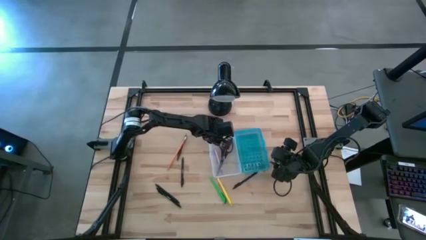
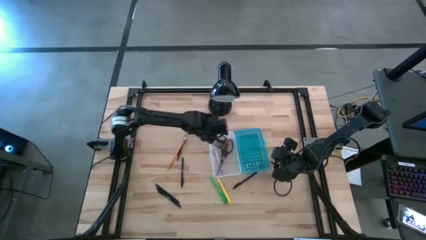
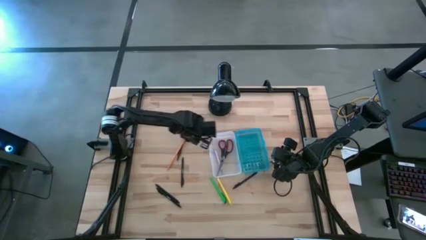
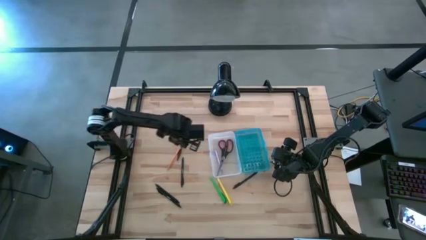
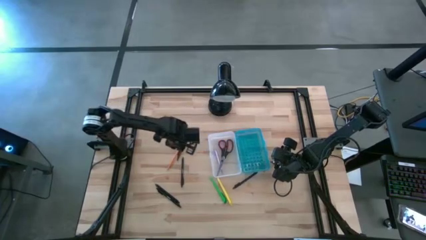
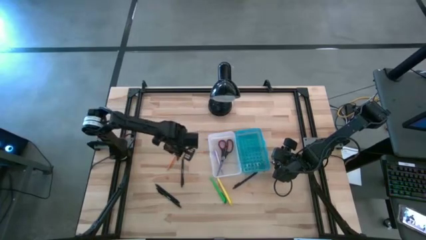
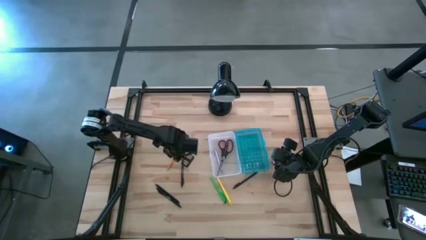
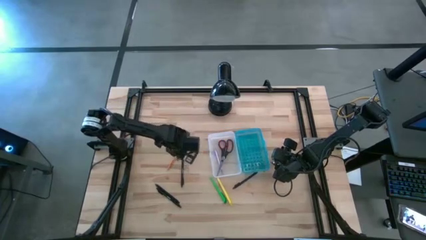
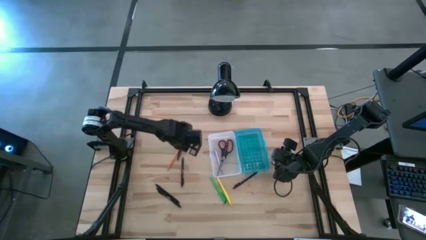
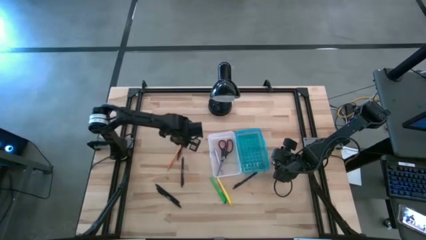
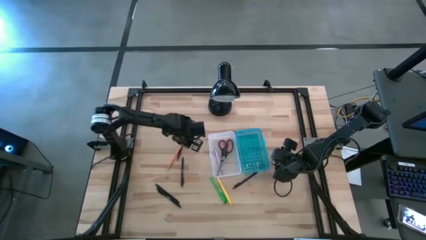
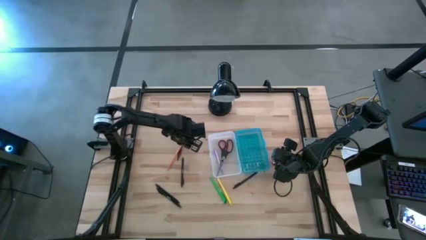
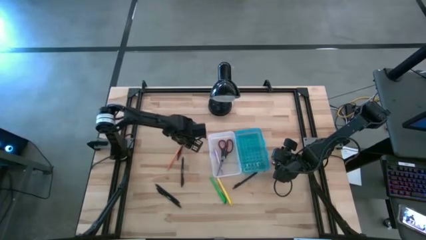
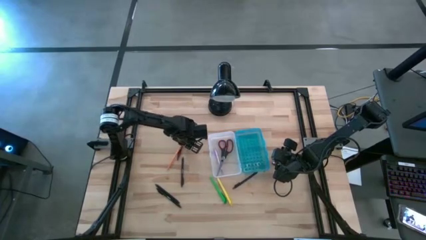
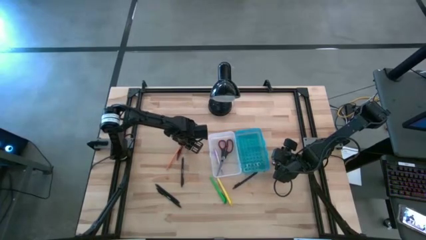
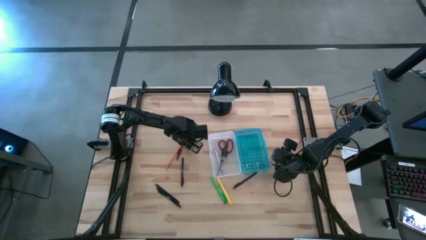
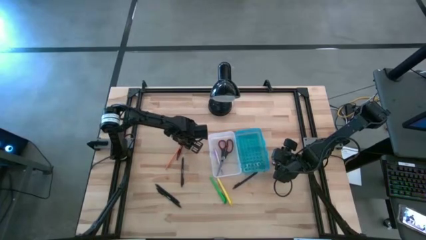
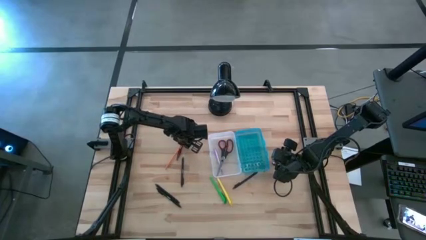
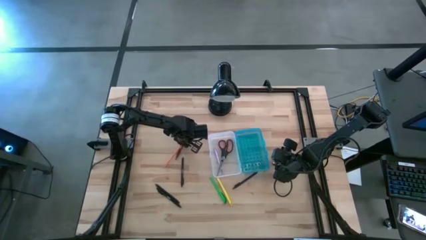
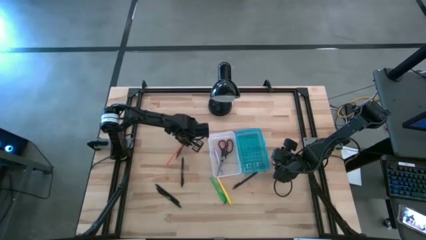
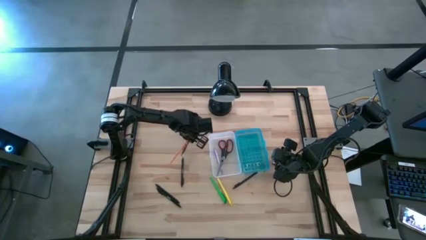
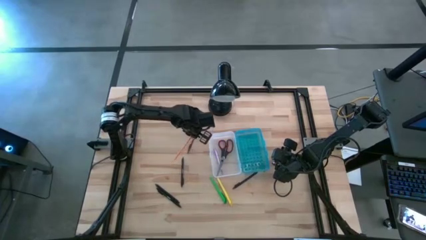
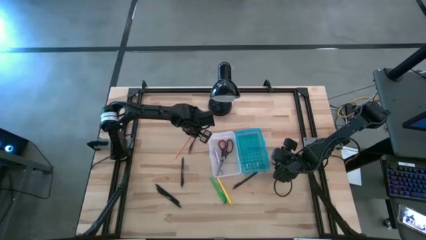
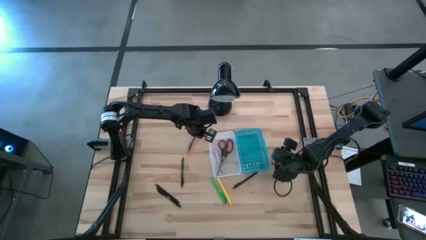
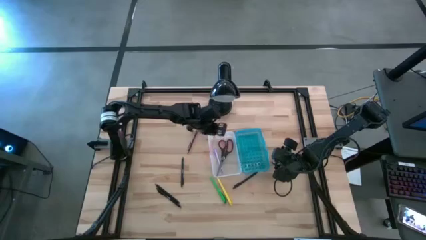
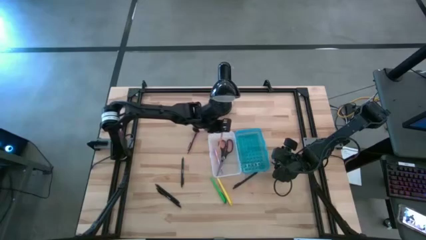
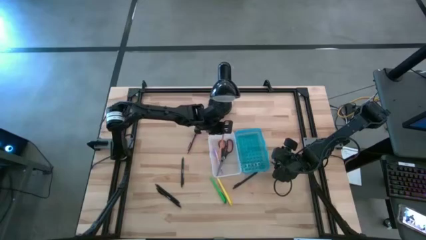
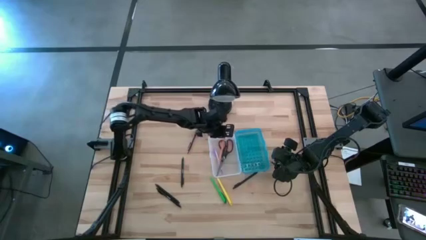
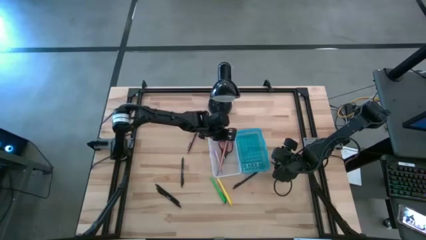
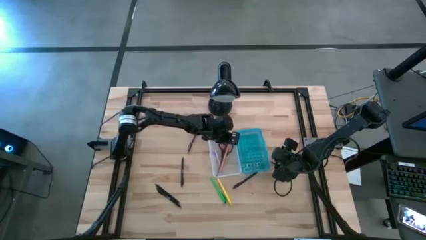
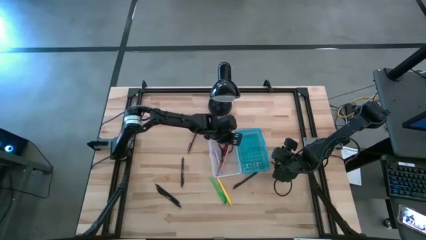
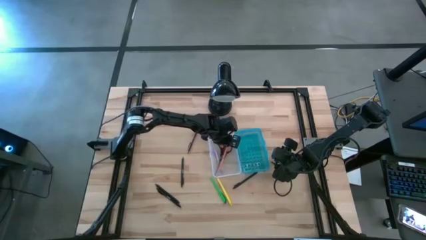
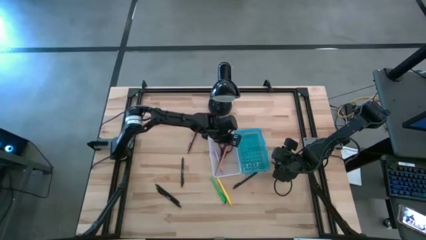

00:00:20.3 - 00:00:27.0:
Task: Pick & place school supplies into a supply box
Put the orange pencil into the supply box

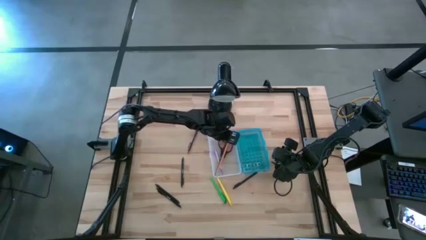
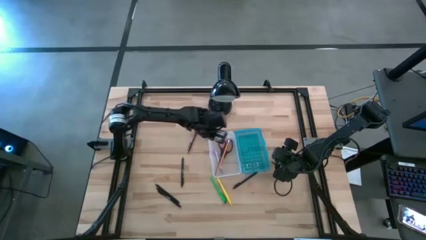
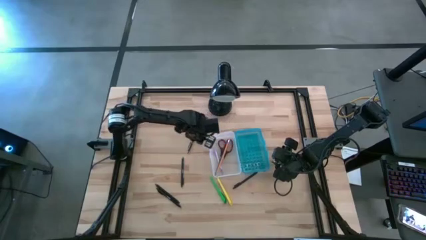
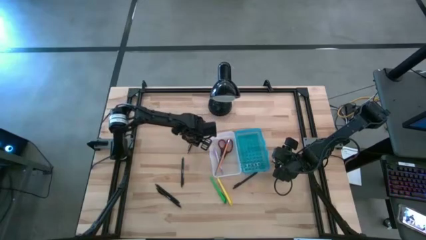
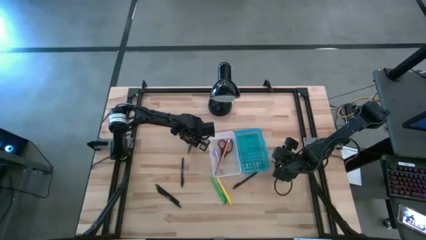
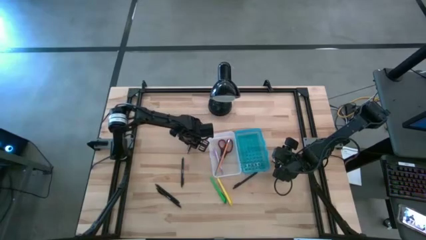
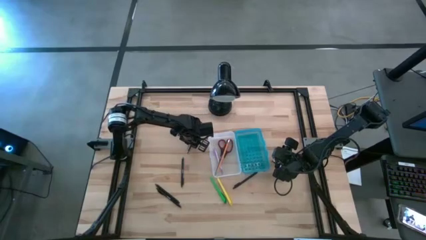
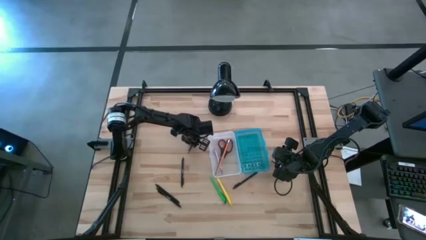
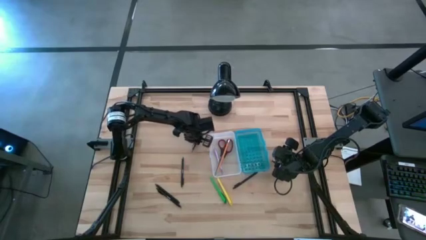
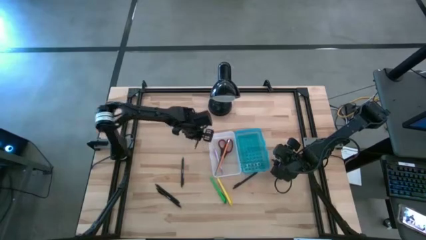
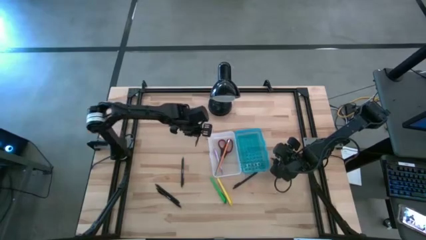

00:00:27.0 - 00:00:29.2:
Put the black pen into the supply box

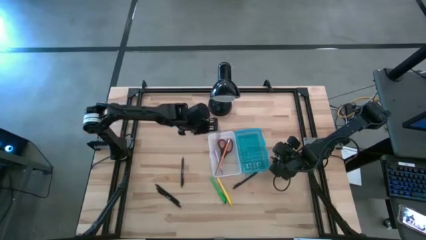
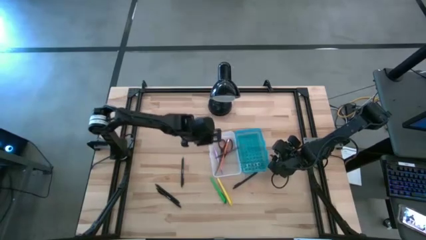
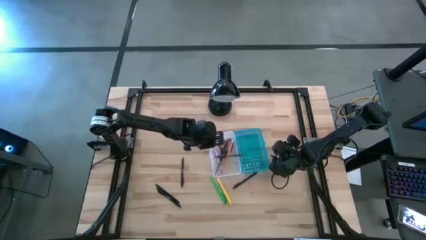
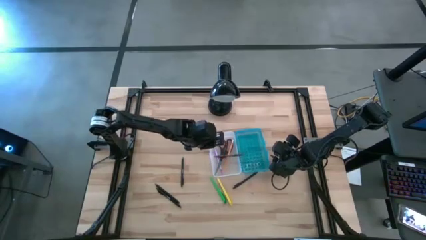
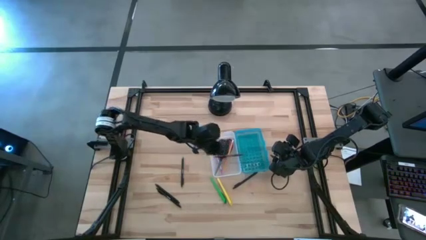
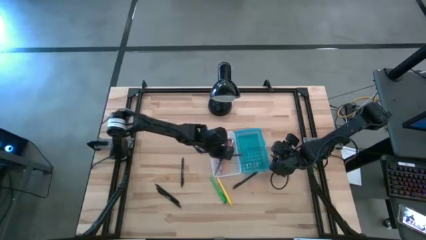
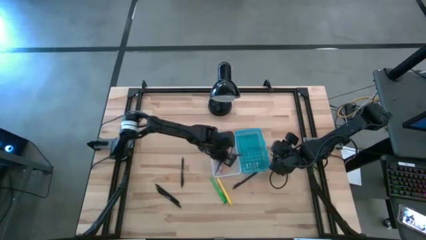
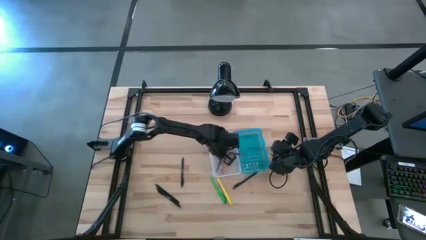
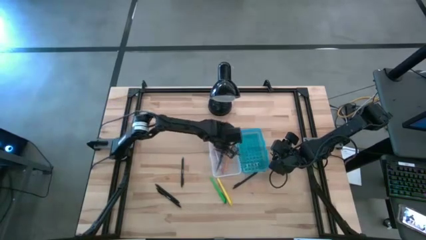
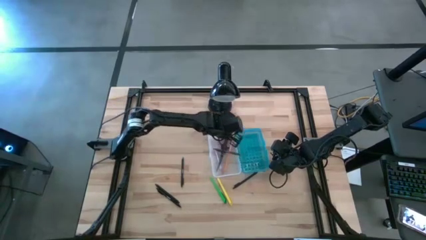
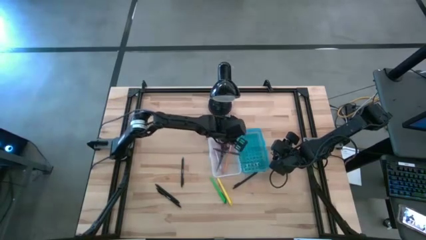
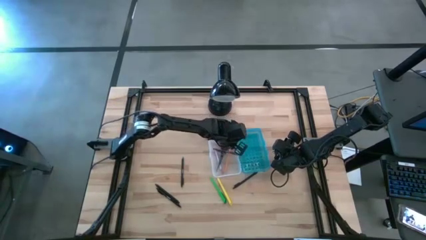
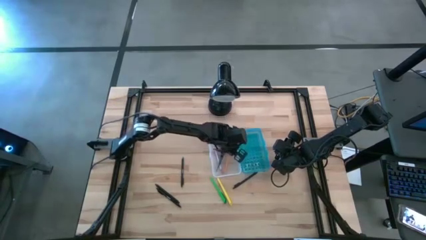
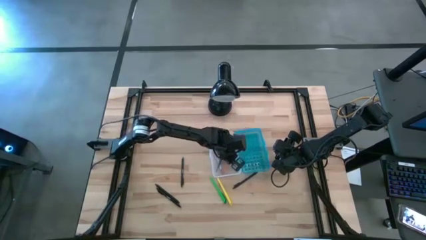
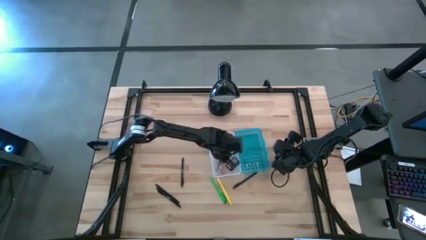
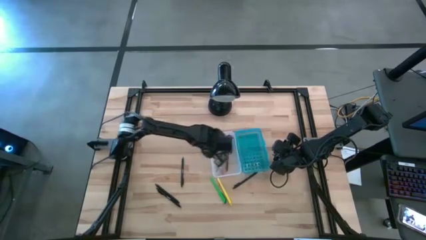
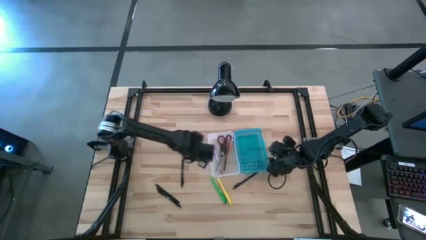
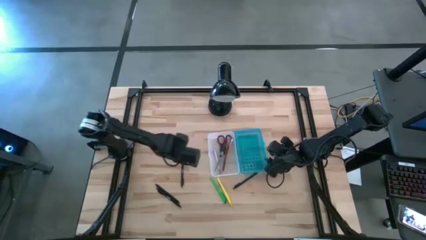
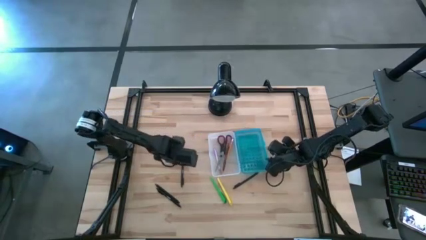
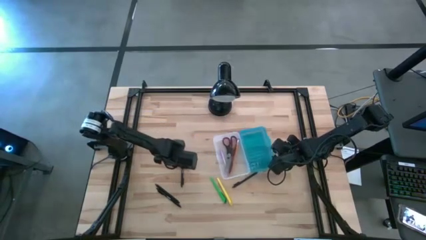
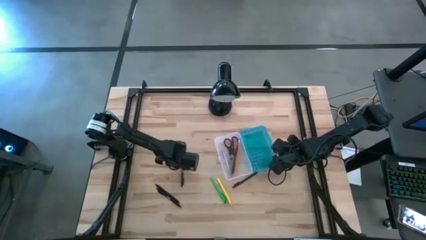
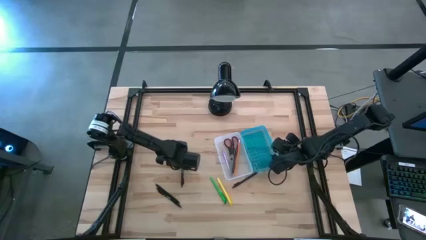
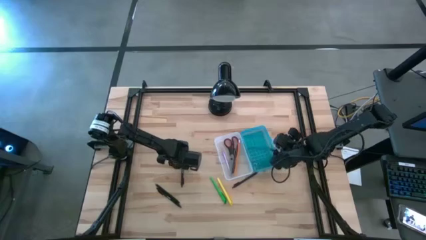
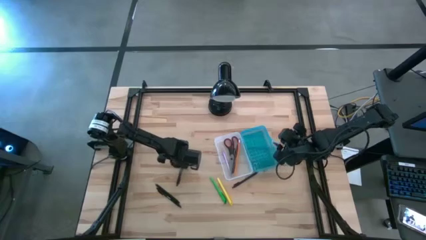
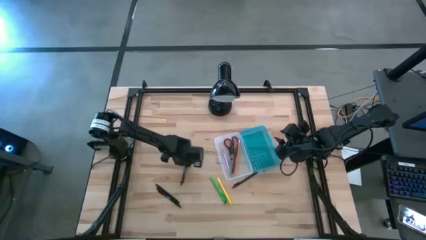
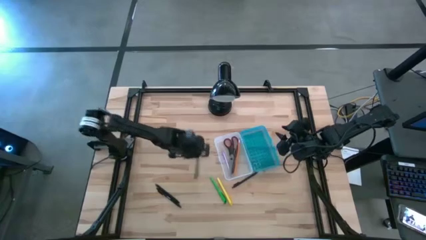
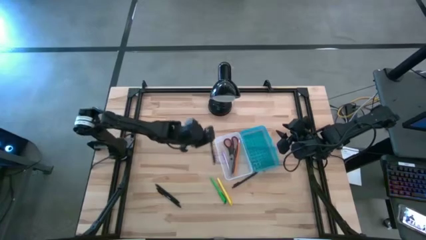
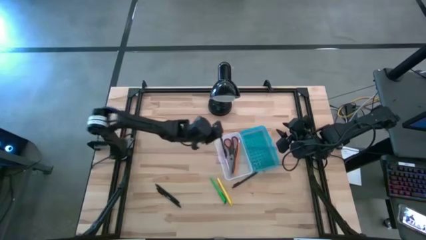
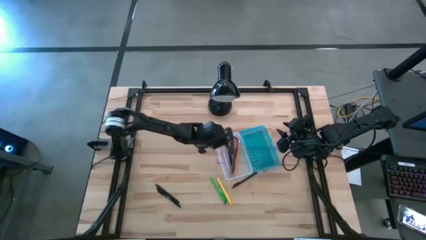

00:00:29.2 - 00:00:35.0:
Put the black pen into the supply box

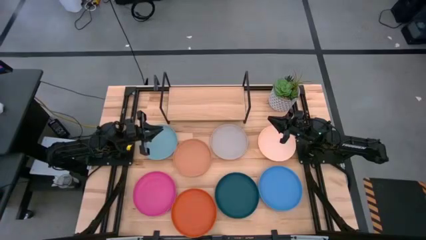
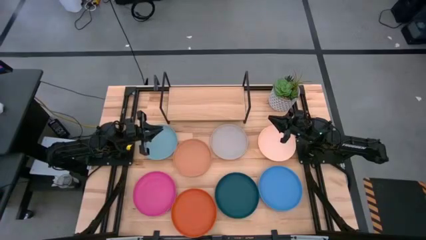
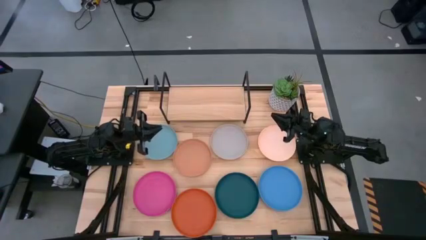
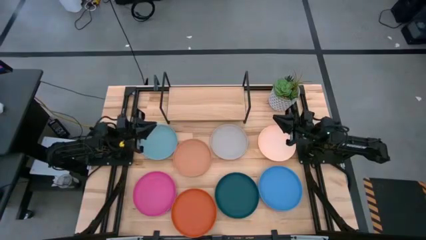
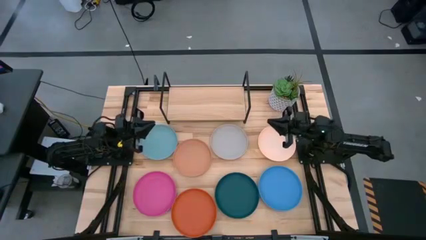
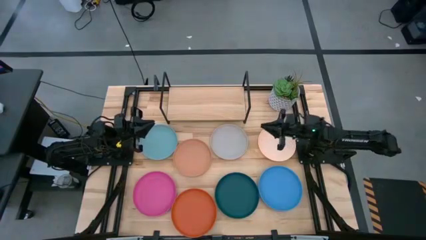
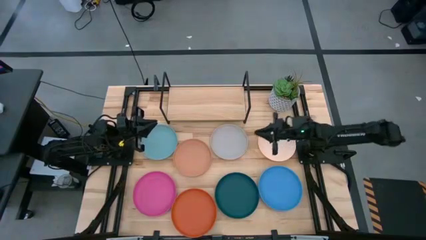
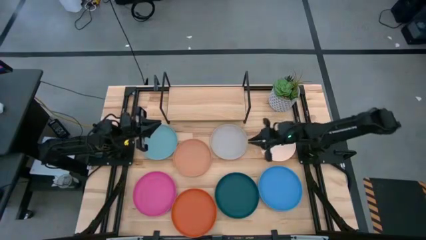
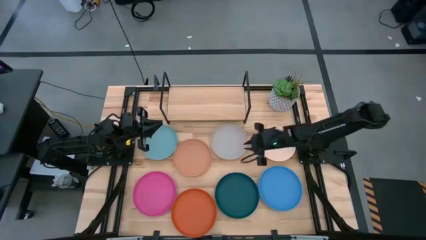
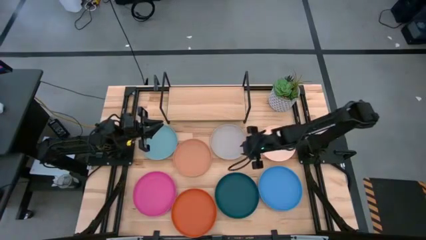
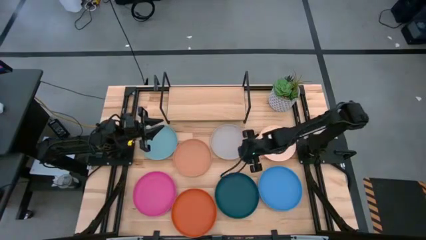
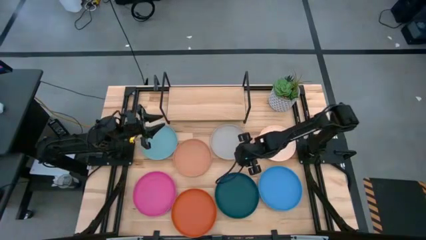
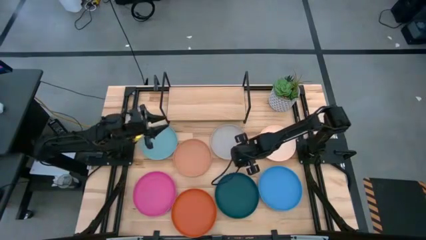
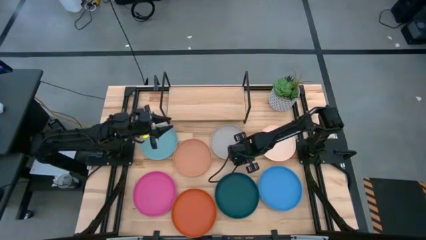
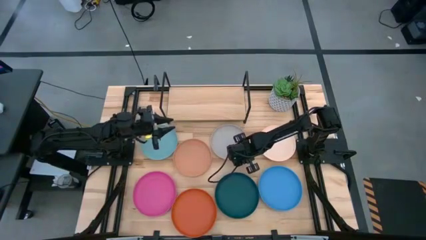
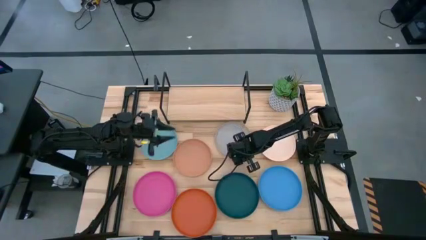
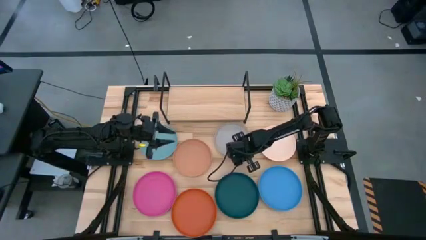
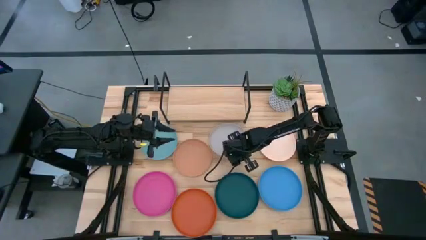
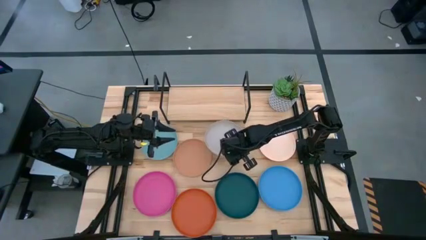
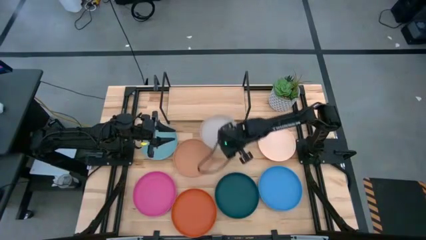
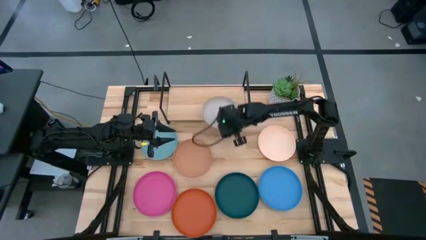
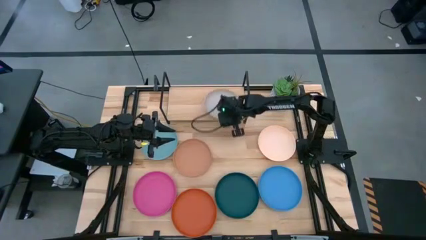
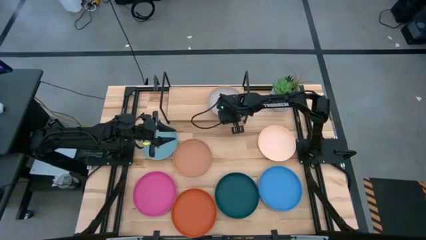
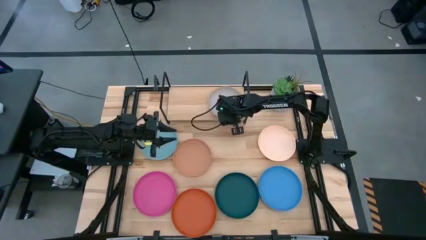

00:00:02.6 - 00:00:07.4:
Task: Place and stack plates onto a shelf
Put the gray plate on the shelf
